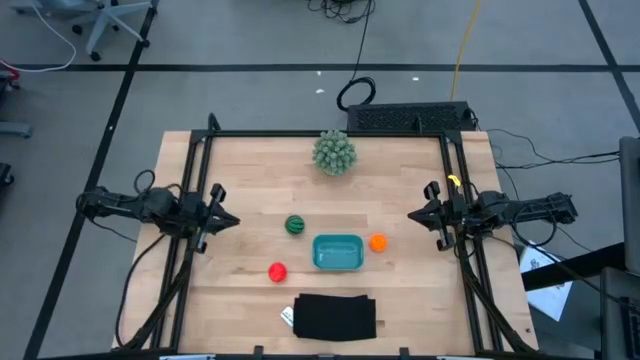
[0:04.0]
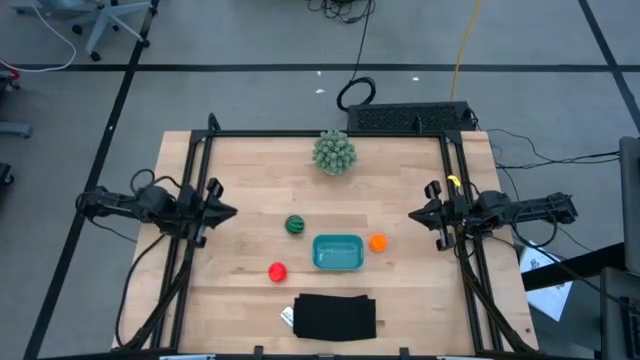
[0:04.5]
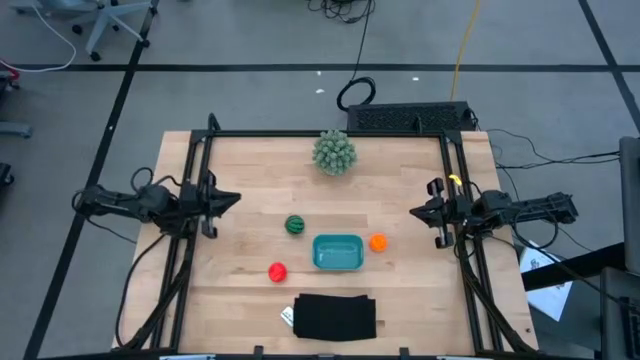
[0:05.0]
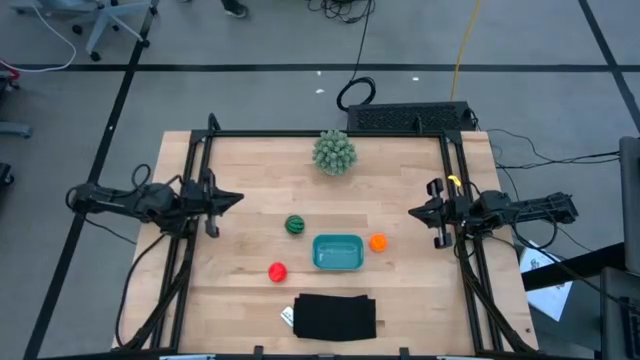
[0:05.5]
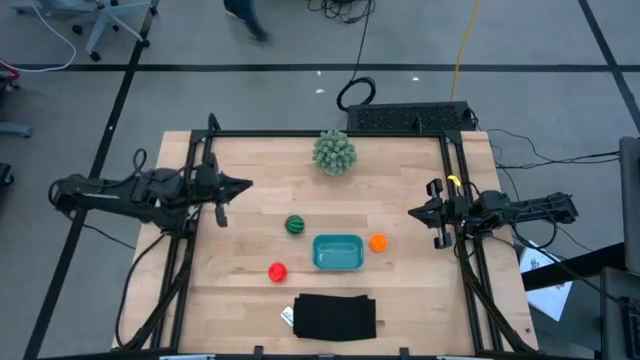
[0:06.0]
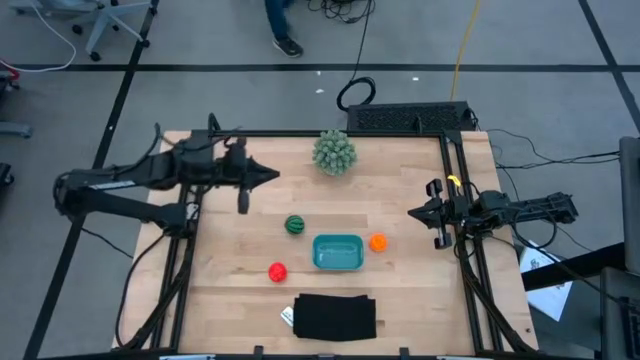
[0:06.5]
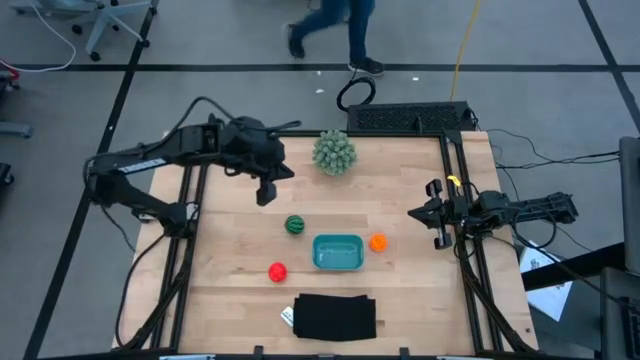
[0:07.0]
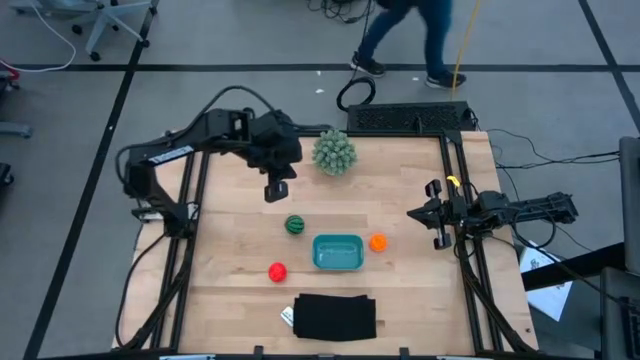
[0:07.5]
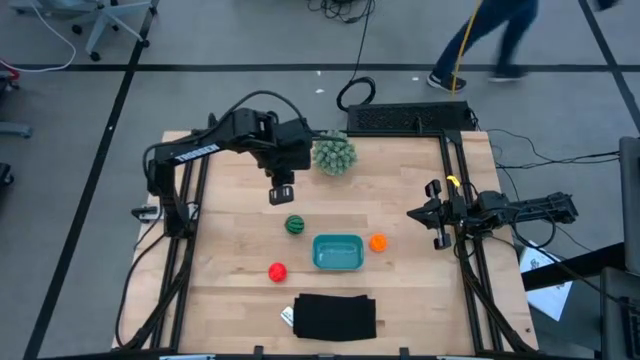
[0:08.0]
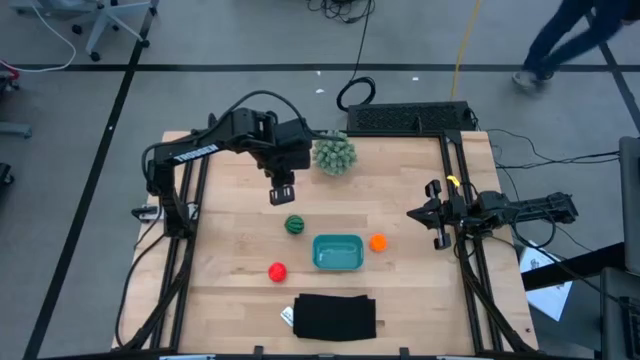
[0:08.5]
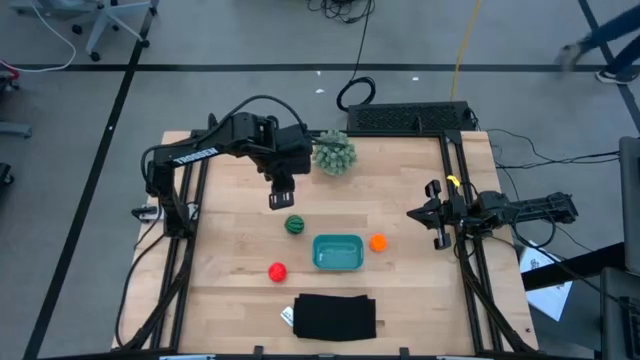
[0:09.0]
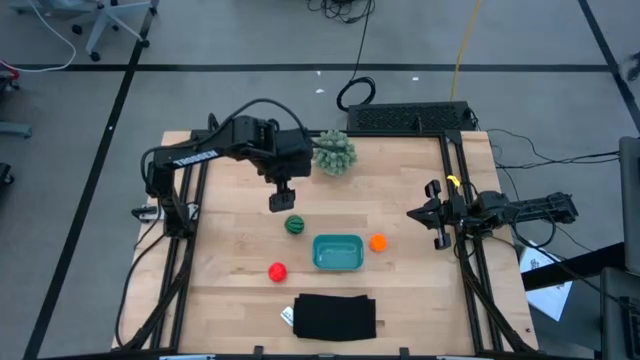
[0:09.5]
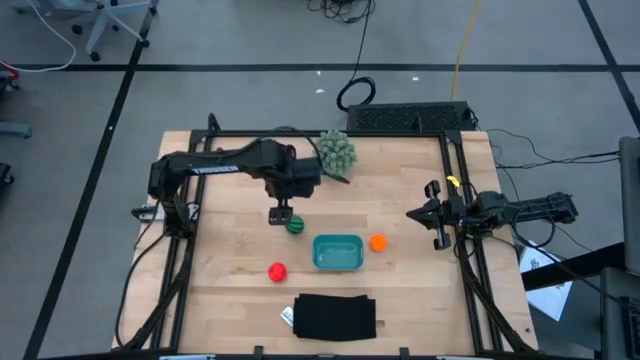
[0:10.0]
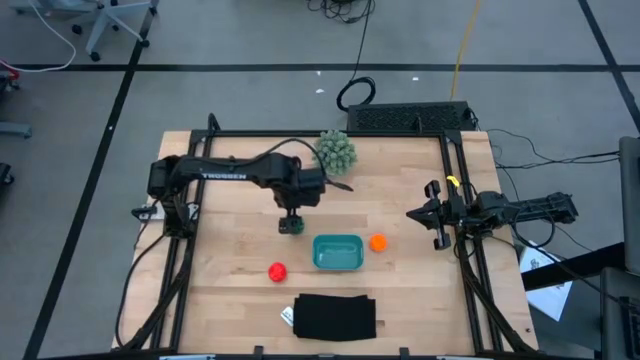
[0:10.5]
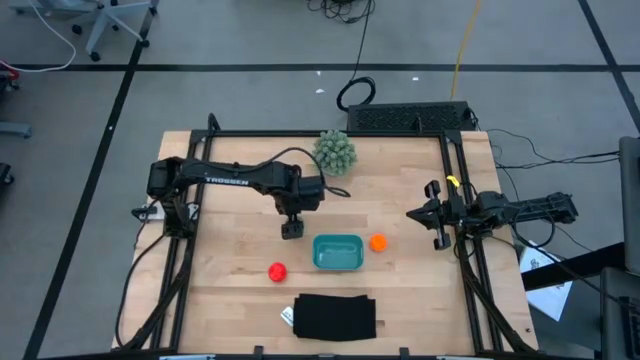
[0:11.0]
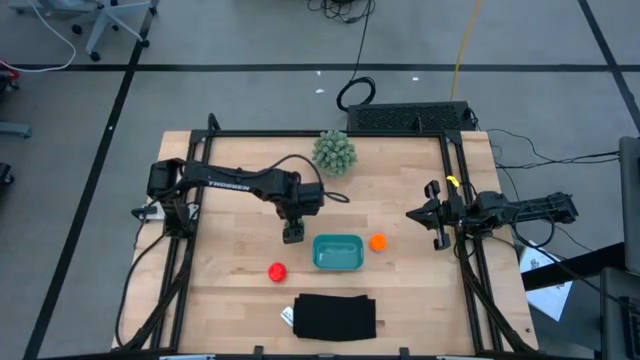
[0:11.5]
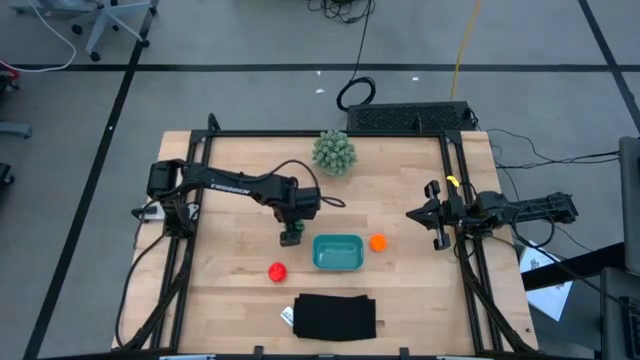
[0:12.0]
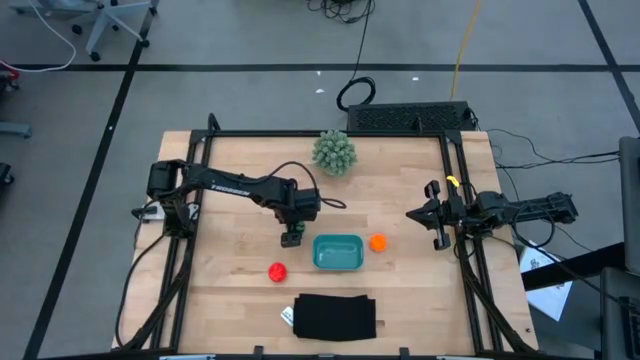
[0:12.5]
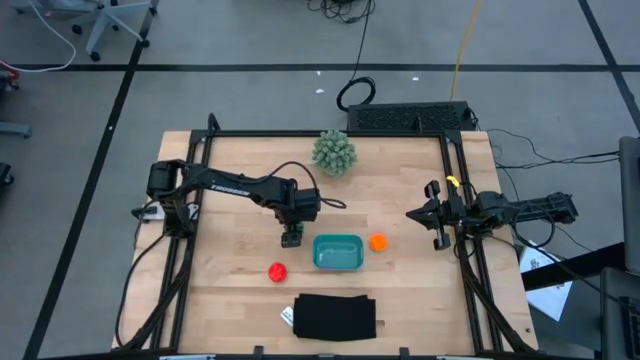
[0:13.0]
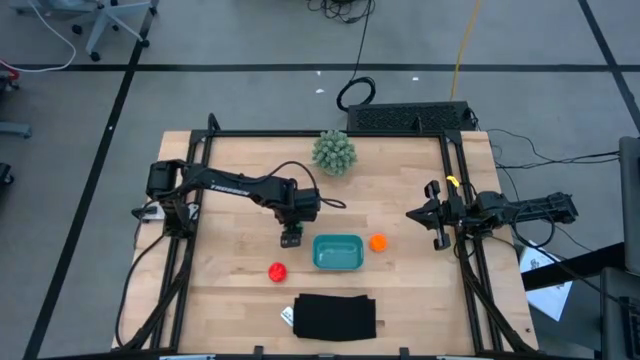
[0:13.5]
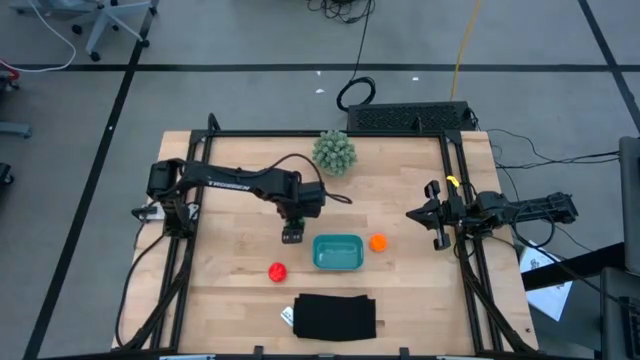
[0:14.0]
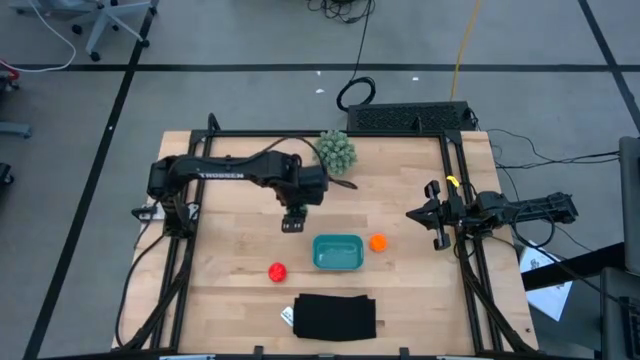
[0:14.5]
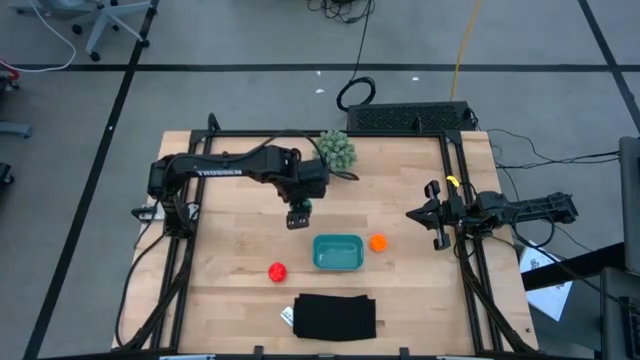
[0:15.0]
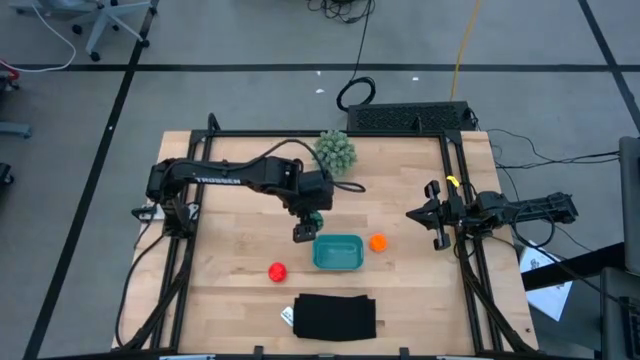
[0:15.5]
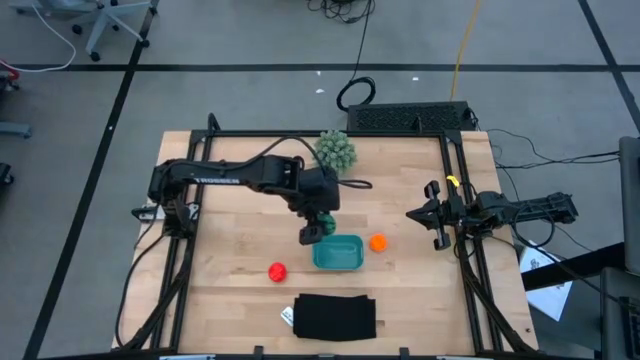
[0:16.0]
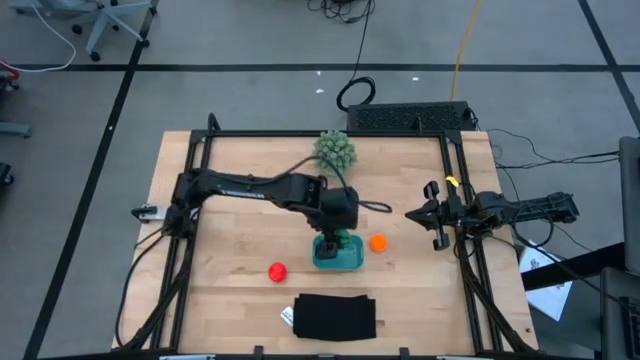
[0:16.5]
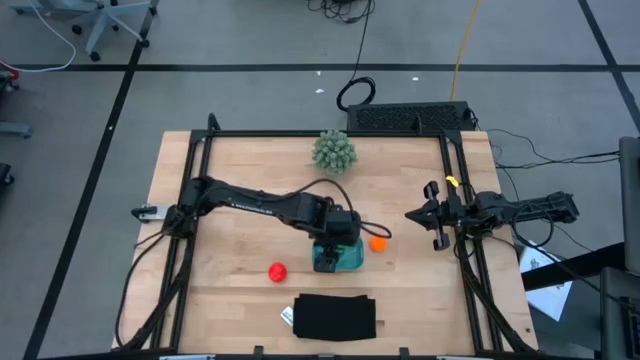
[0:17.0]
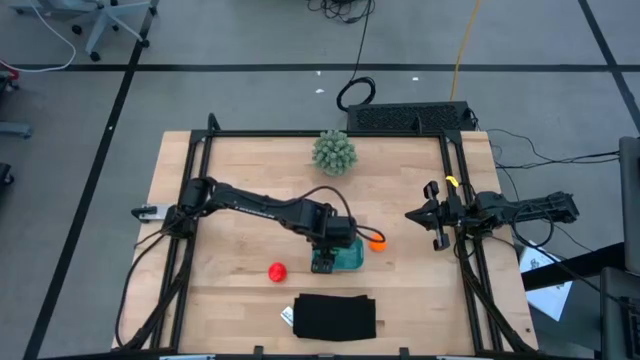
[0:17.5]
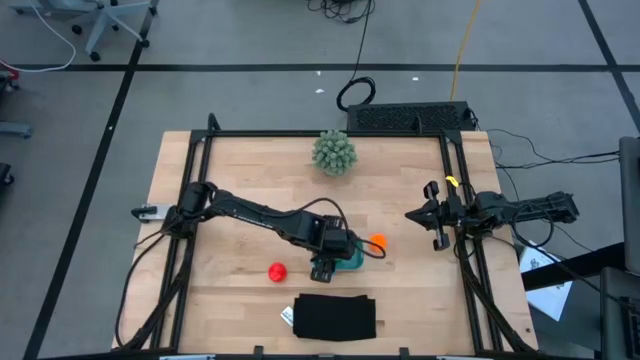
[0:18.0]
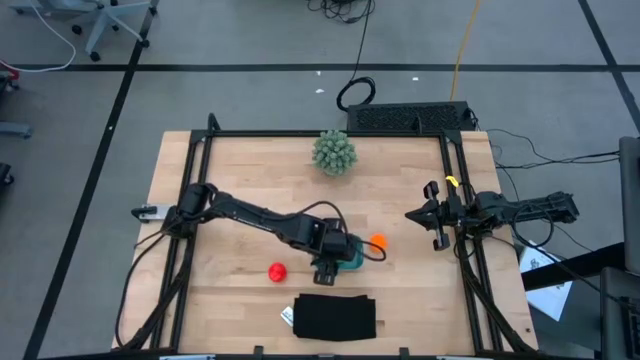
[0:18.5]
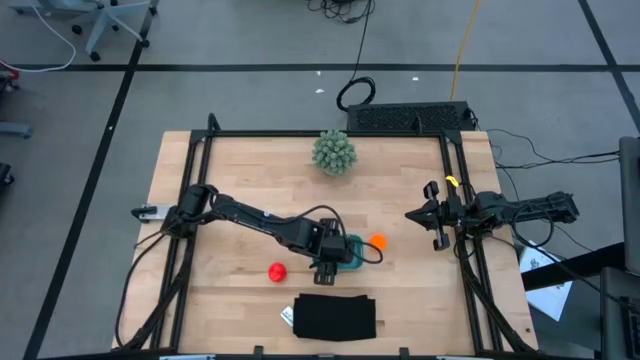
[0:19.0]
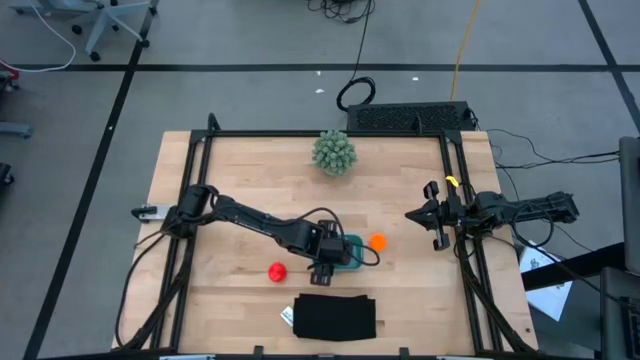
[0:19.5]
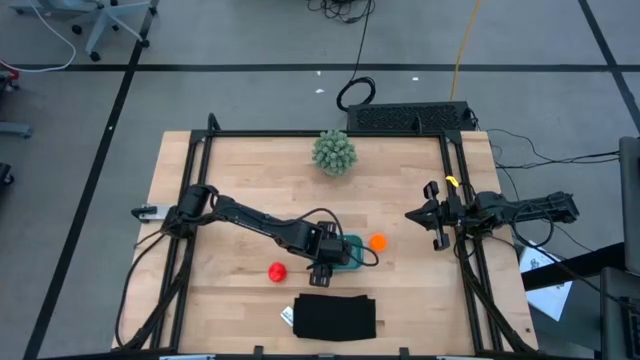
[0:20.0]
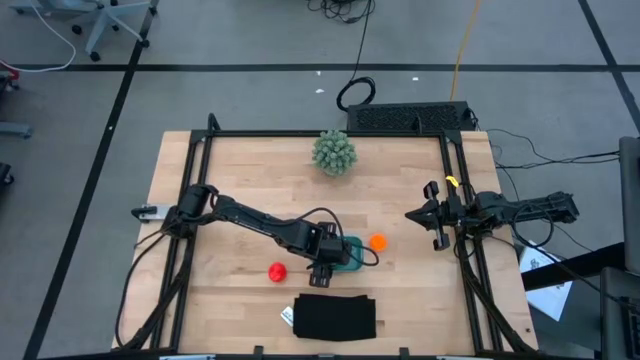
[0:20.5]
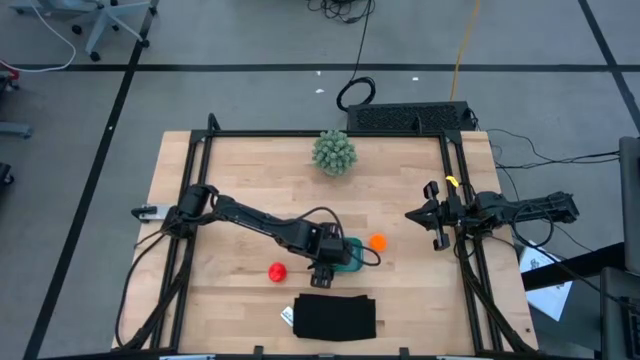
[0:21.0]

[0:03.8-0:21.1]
Task: Pick and placing Produce into tupperware
Put the watermelon into the blue bin
